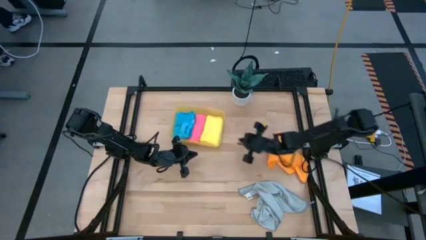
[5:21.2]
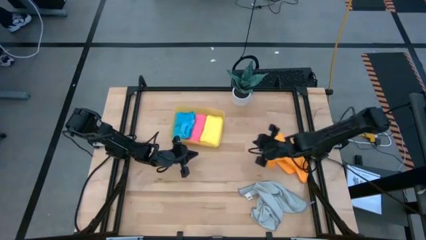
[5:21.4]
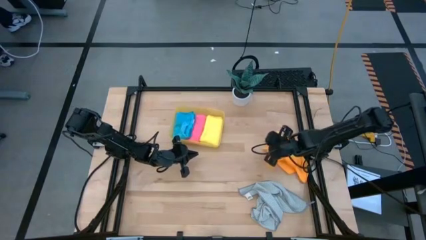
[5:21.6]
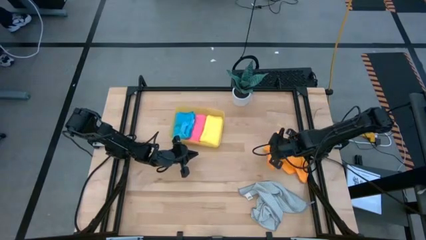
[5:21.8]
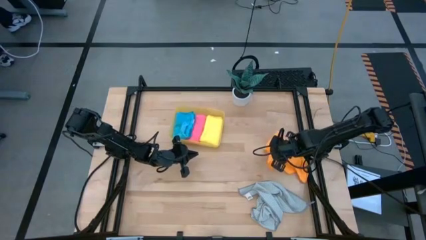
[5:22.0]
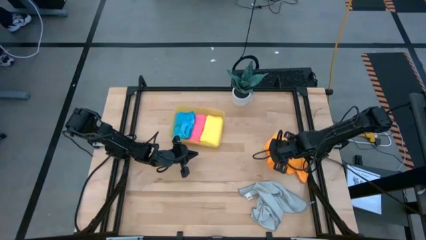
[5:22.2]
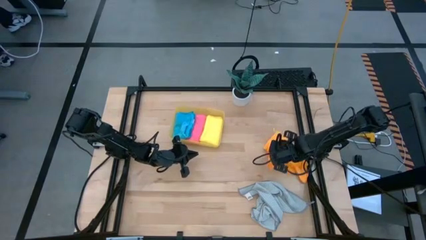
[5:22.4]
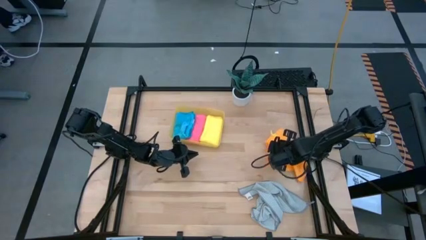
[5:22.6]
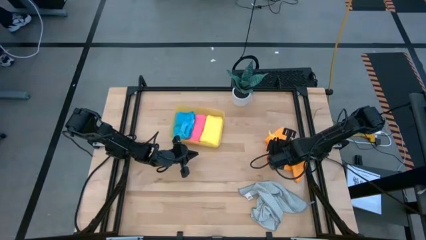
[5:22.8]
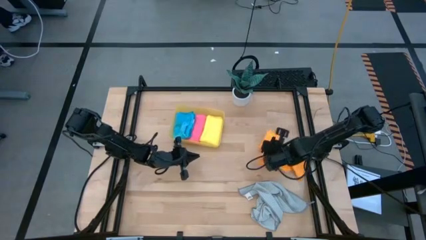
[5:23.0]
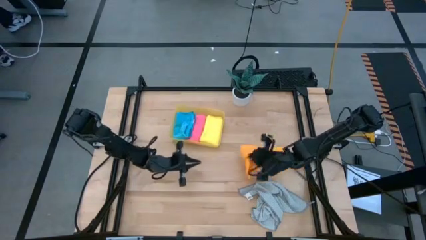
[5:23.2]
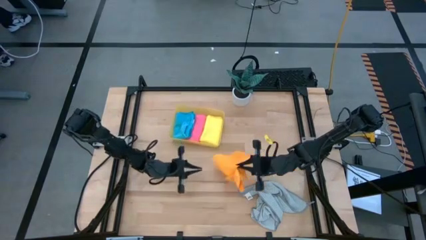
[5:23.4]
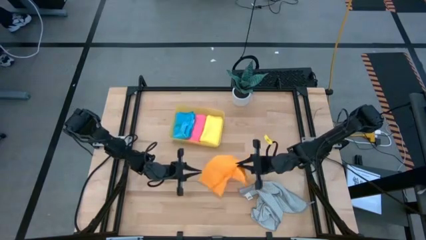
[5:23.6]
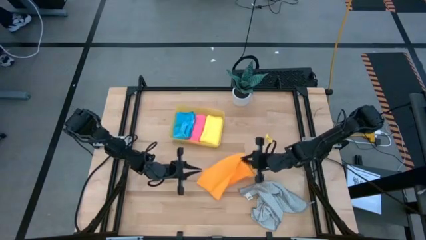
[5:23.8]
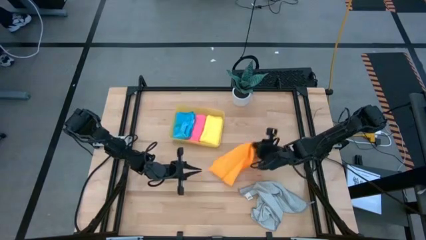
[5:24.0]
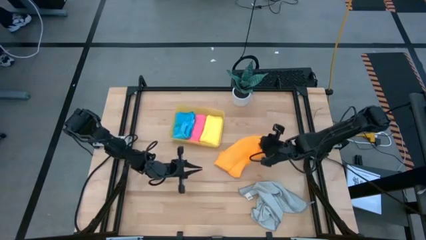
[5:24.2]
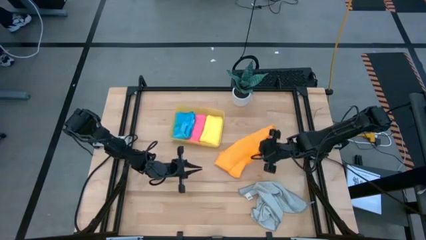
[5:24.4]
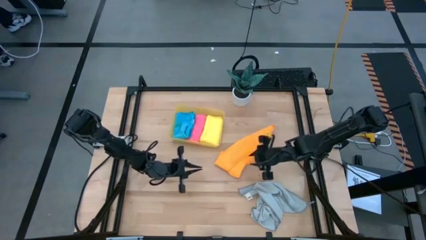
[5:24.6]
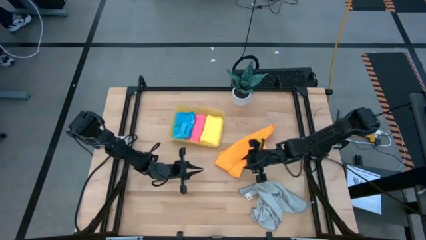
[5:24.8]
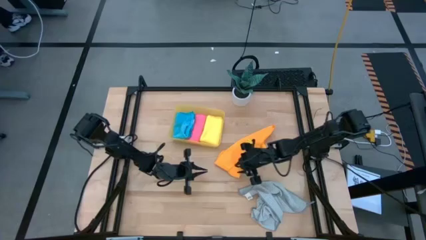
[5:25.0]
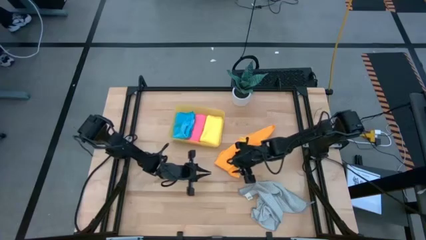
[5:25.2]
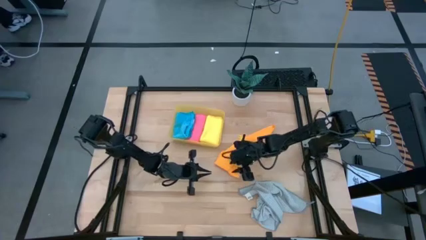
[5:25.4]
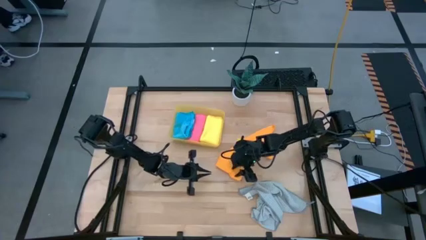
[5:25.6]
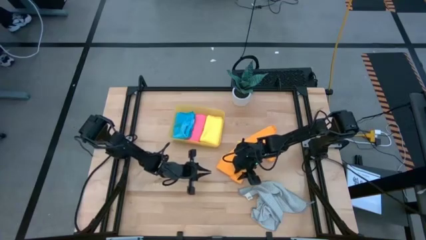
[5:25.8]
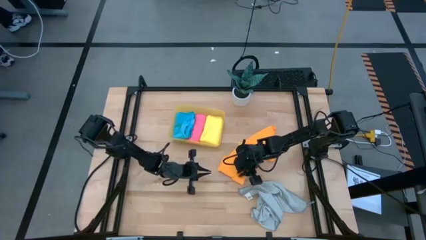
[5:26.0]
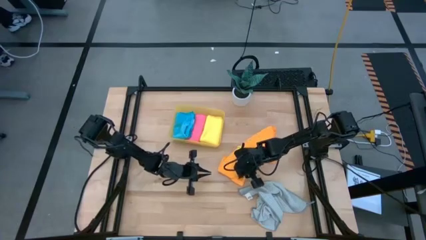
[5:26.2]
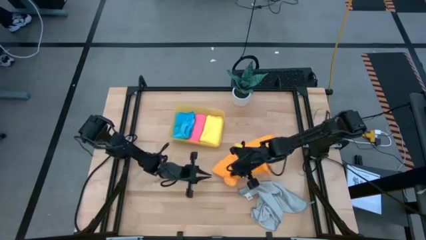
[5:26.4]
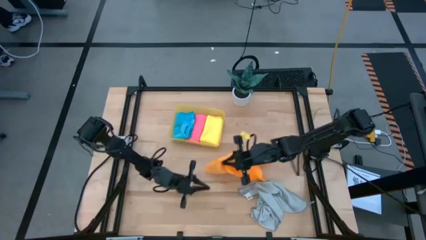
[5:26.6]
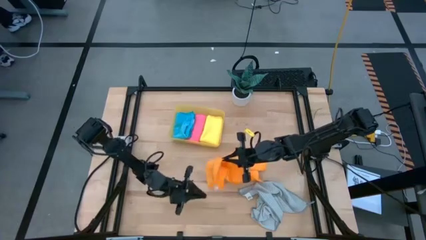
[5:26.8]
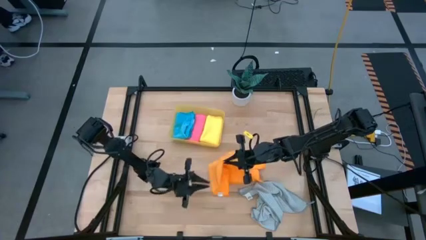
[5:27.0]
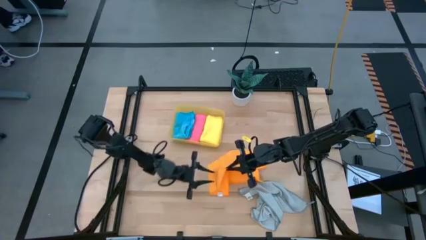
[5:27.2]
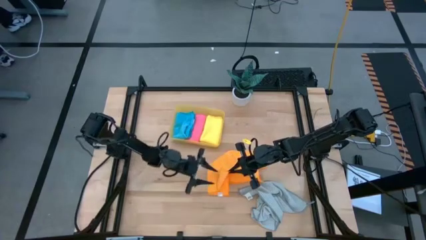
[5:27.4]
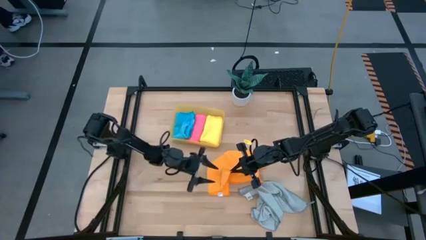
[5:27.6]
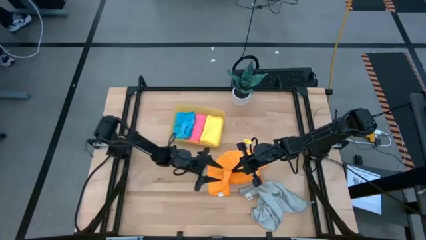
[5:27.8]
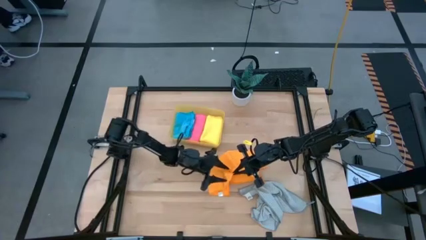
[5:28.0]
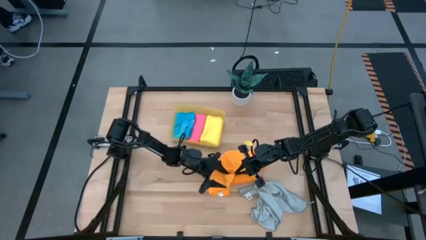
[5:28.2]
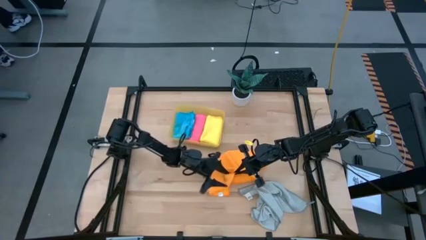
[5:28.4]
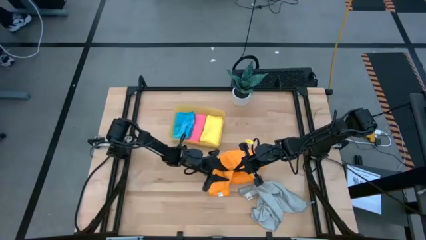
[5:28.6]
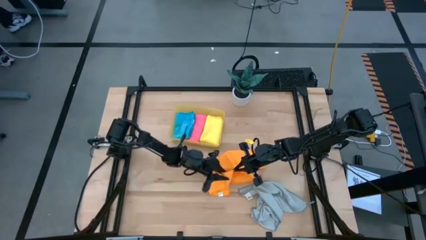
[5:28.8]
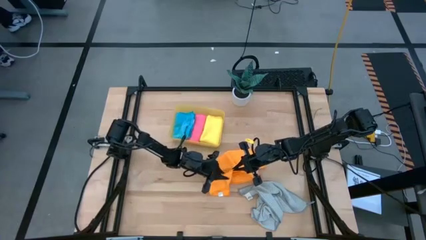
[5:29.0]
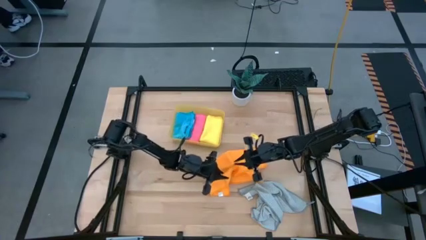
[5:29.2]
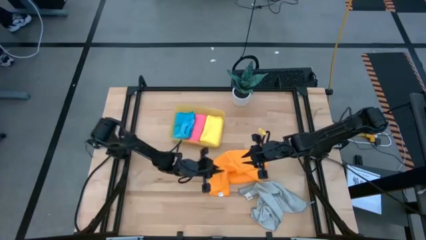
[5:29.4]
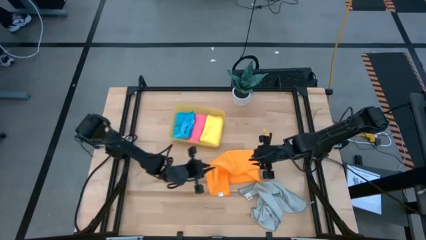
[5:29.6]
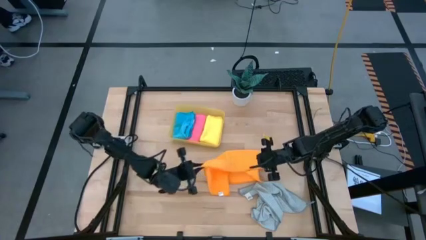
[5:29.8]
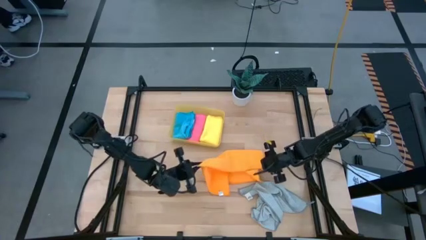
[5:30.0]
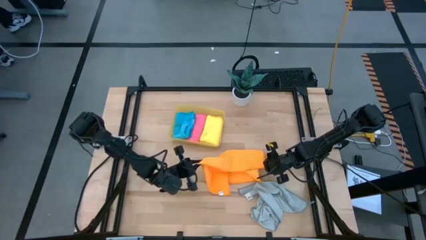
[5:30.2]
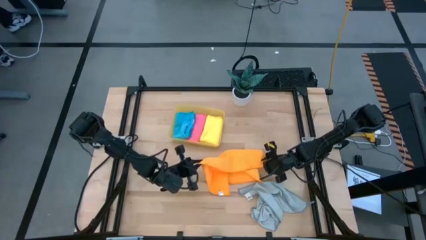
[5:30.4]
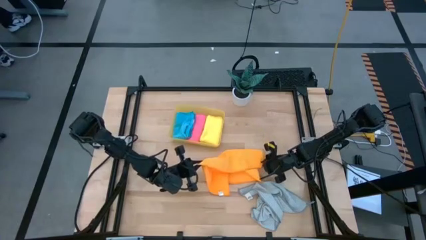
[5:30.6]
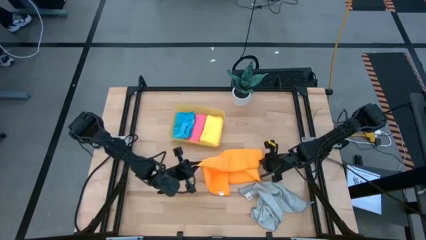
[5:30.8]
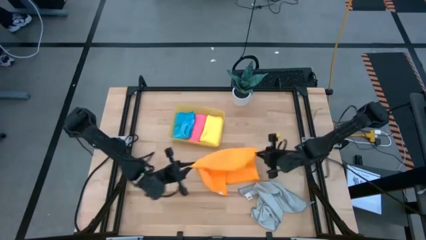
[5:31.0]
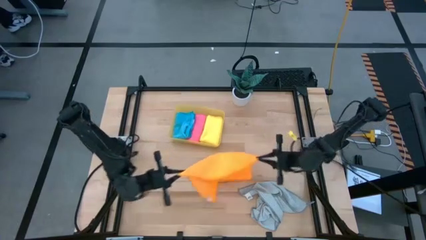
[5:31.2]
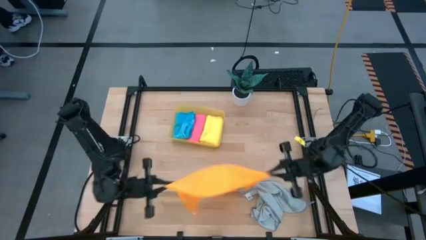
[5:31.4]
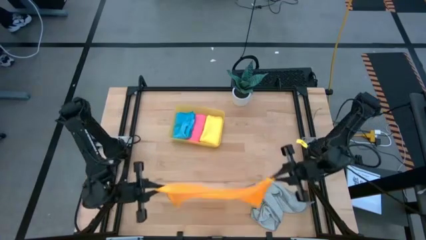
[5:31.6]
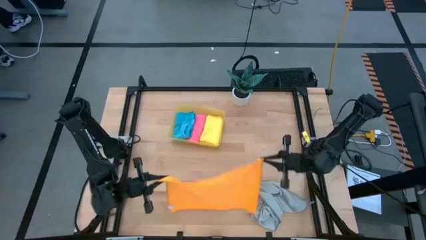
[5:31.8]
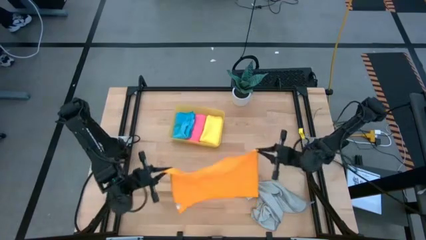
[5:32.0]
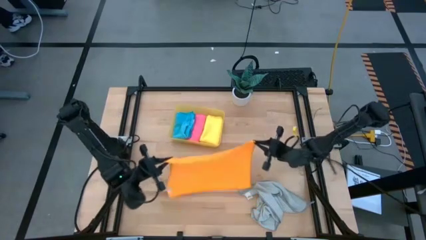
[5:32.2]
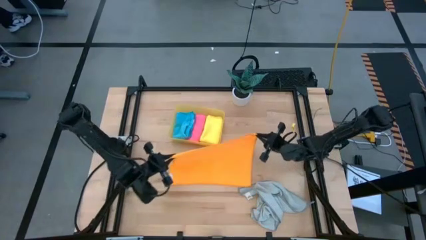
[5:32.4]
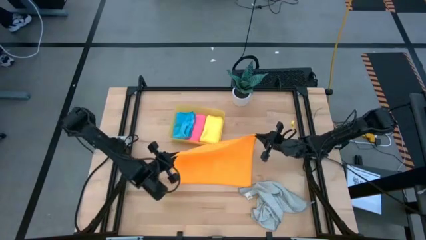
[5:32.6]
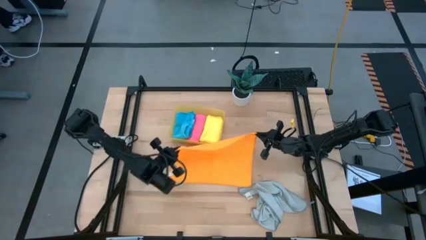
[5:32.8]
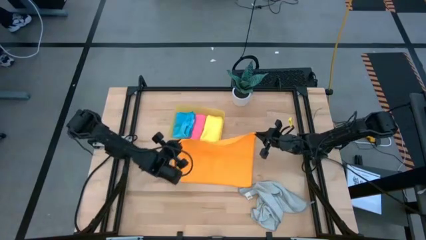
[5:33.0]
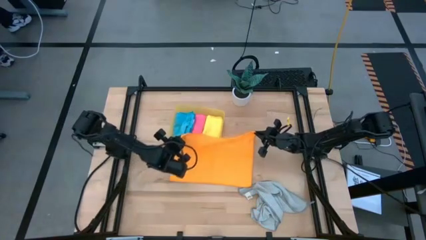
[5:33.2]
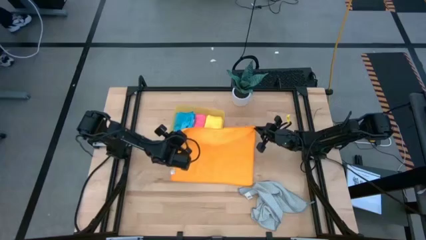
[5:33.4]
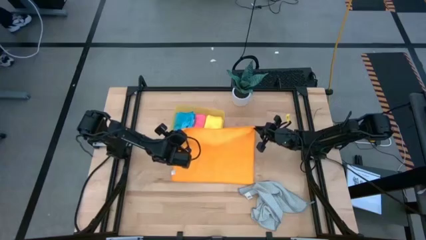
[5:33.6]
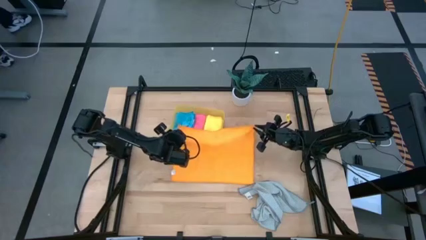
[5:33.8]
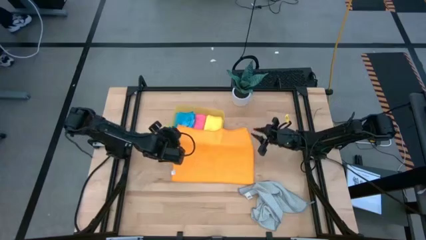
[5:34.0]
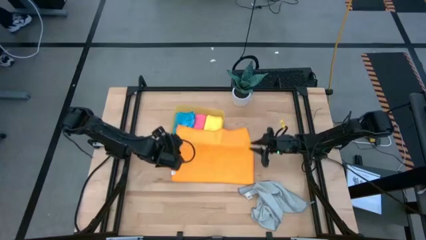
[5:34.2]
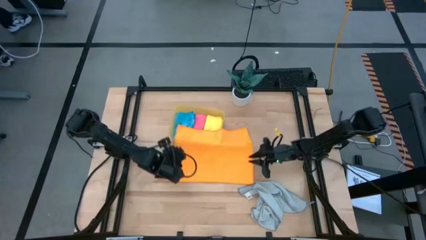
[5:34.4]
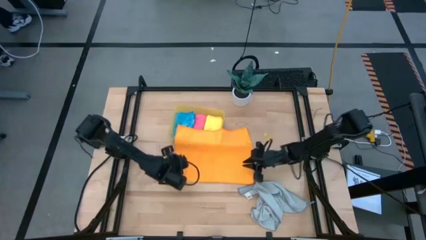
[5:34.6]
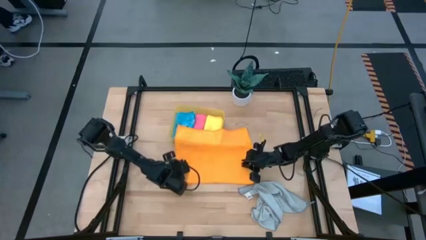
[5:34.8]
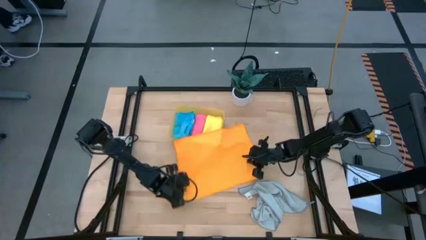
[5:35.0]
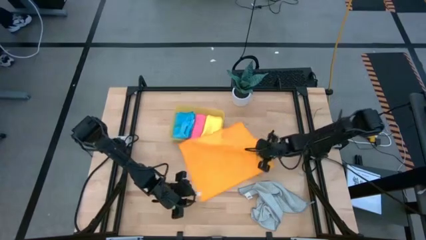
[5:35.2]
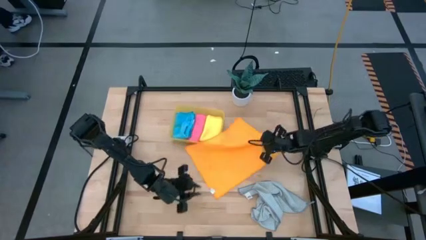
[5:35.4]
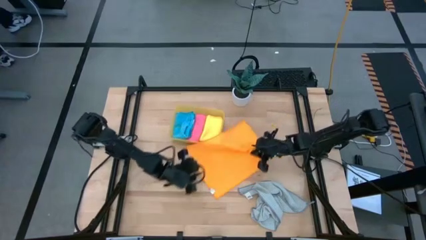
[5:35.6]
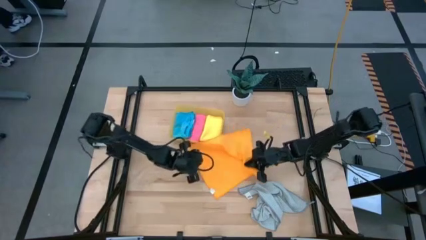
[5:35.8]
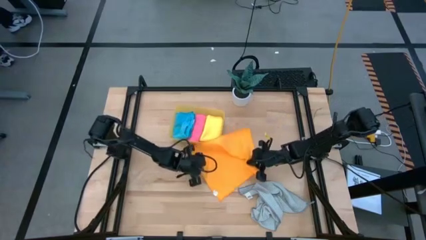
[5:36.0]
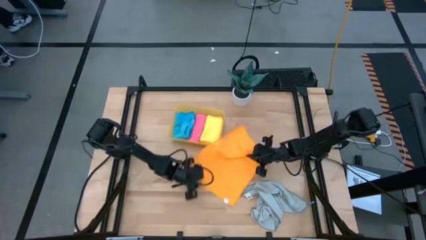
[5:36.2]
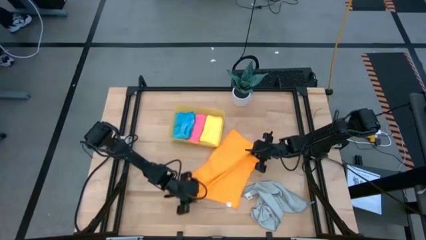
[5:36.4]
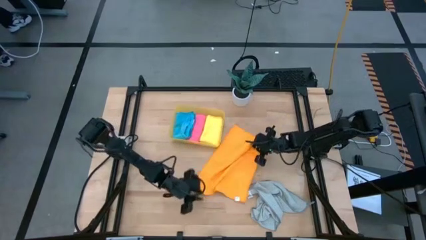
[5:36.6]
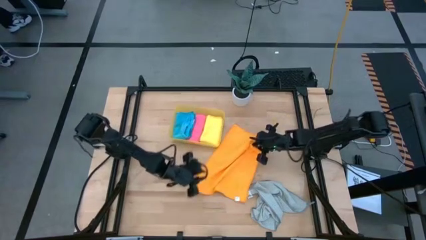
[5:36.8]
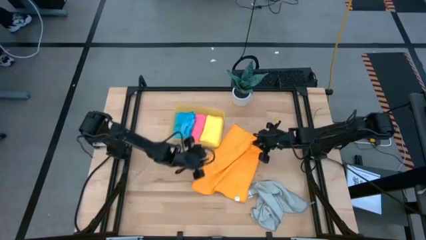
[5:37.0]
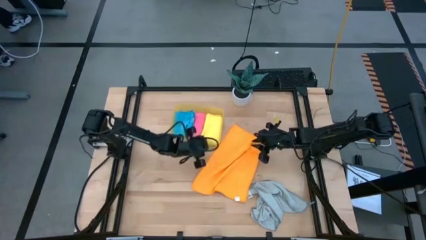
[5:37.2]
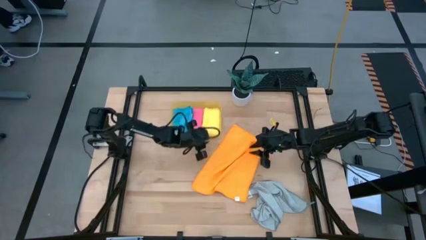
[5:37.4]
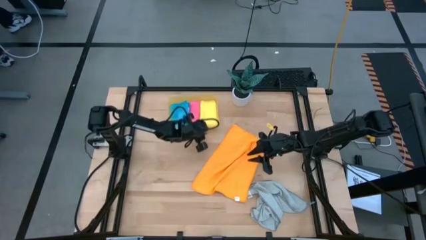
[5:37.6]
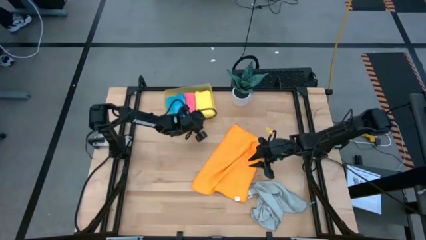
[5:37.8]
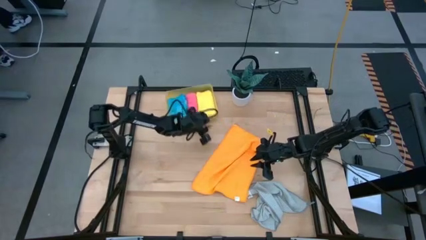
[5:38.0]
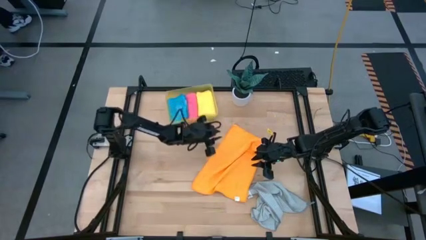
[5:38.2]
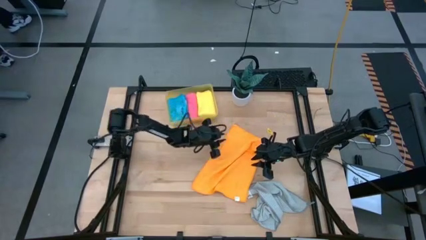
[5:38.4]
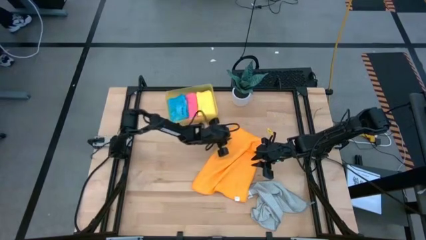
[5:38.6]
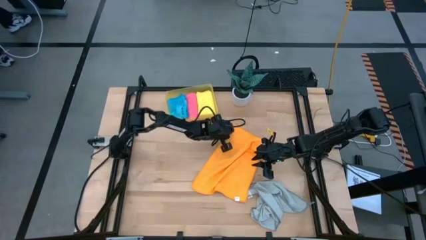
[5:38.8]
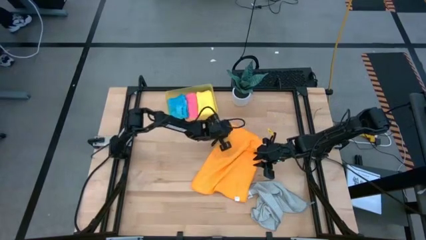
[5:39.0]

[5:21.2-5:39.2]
Task: Fold microfiber towels
Fold the orange microfiber cloth
